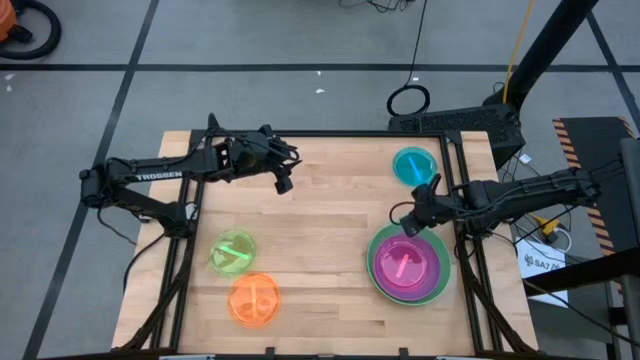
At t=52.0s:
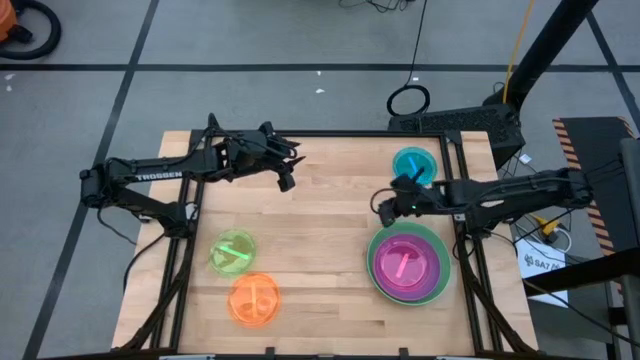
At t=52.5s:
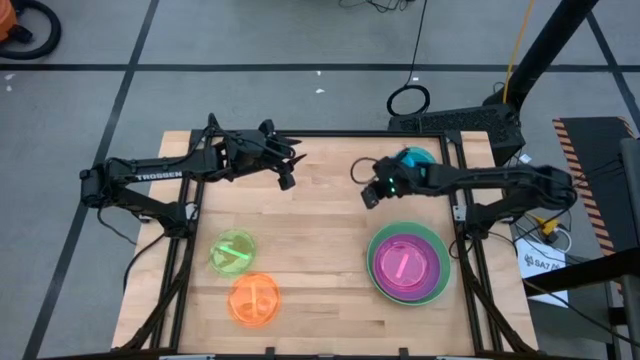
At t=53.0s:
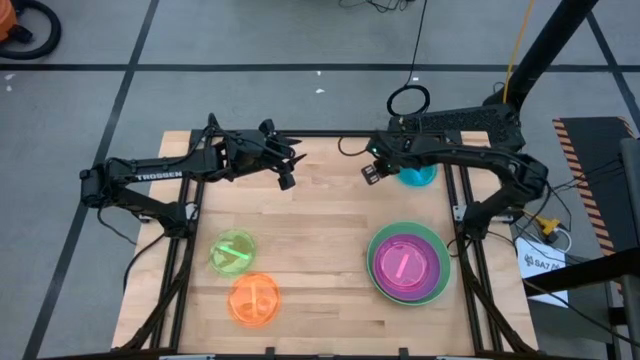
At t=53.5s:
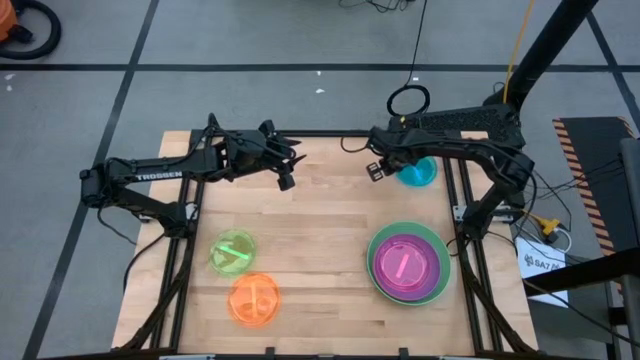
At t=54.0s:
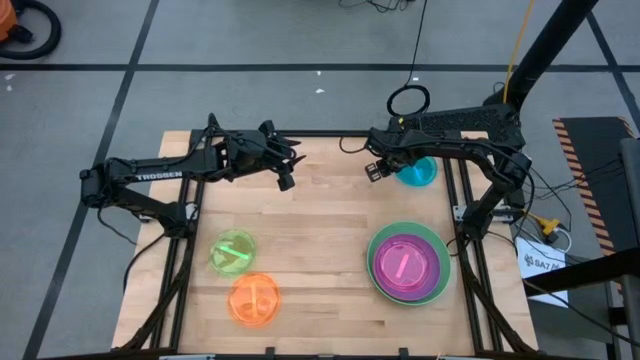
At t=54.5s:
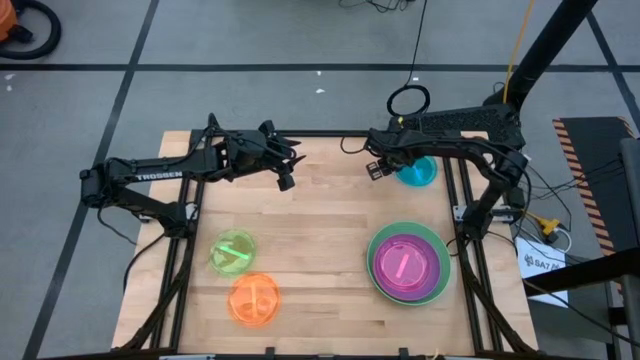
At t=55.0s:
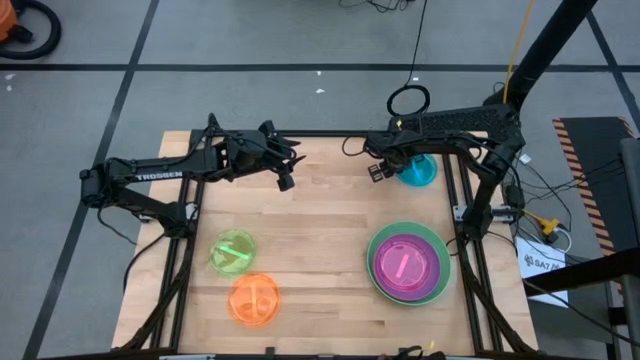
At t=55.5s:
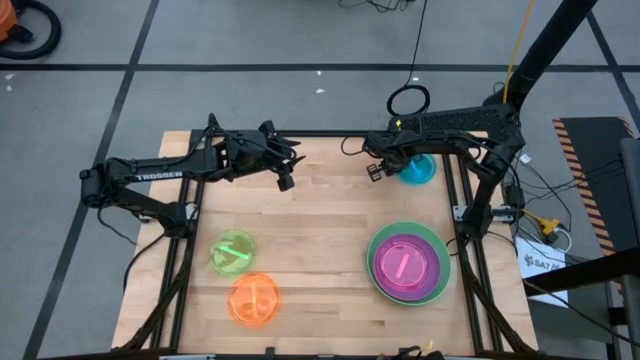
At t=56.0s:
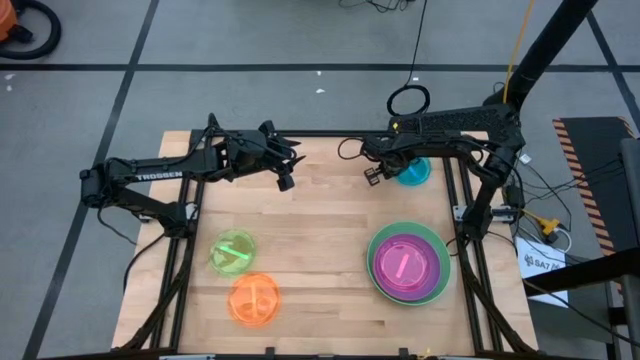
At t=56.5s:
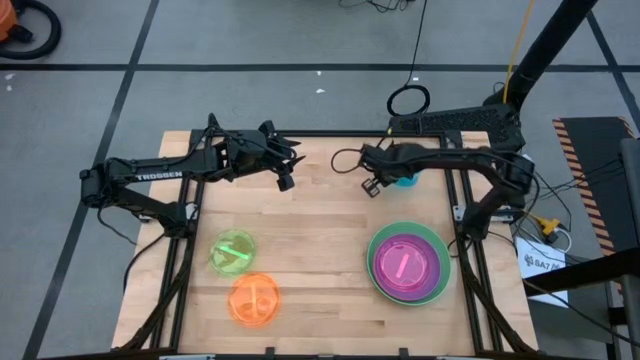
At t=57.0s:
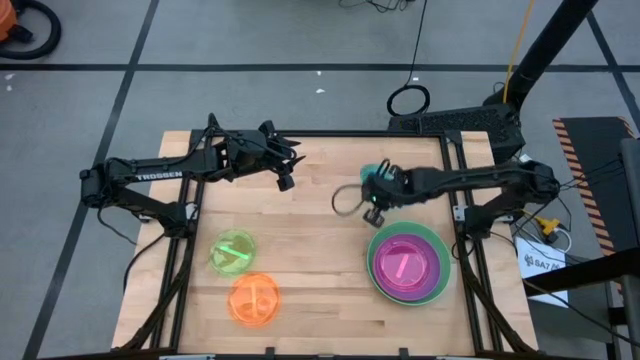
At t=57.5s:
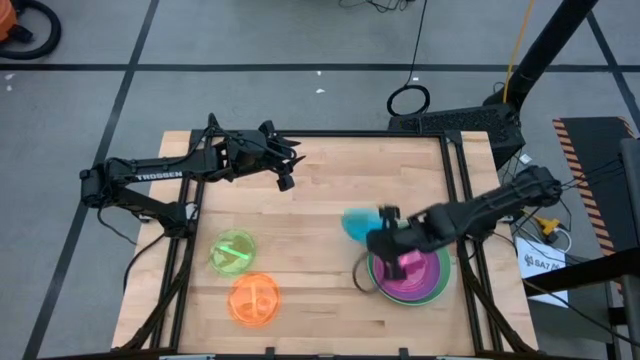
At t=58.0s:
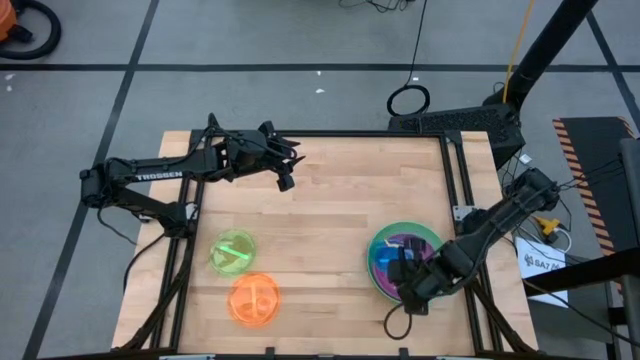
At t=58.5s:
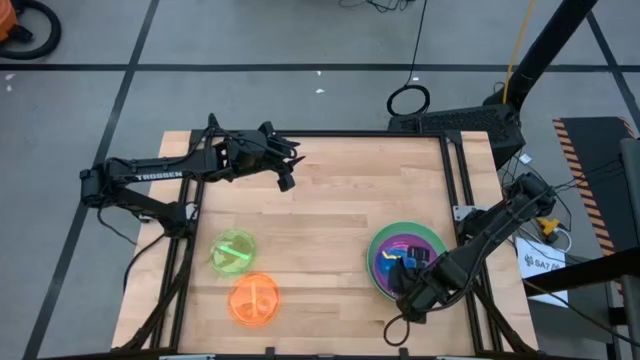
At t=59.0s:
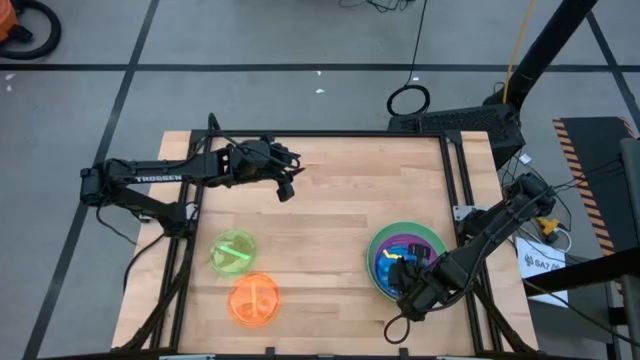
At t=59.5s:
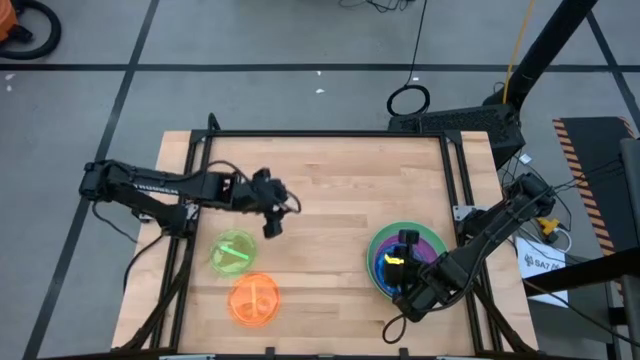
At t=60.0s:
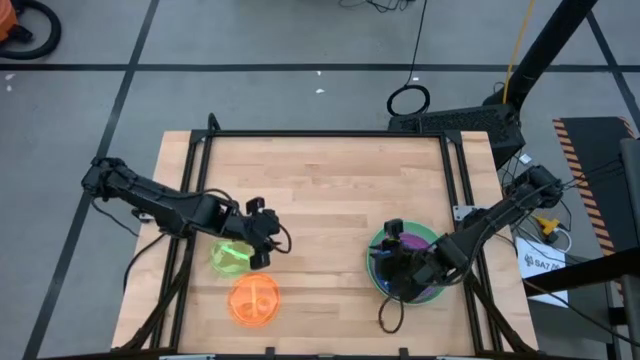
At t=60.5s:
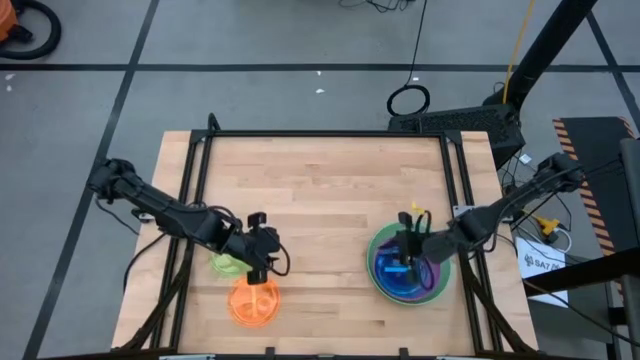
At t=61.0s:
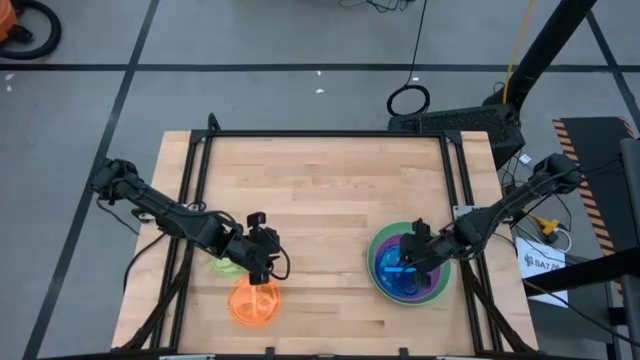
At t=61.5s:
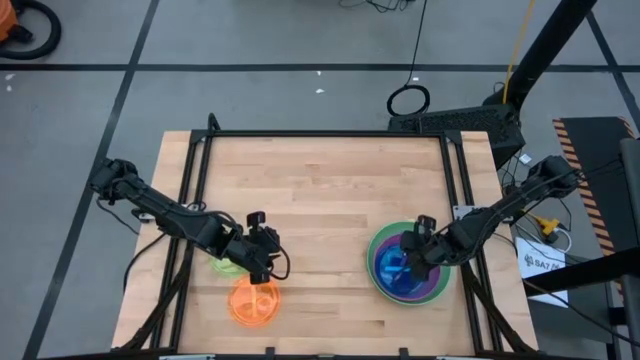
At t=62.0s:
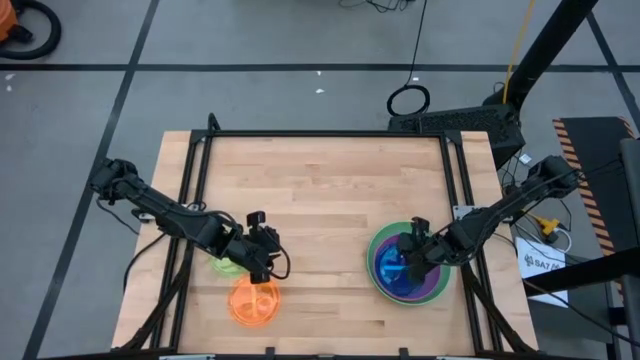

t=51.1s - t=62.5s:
Task: Stack plastic plates
Stack the small blue plate on top of the small pink plate

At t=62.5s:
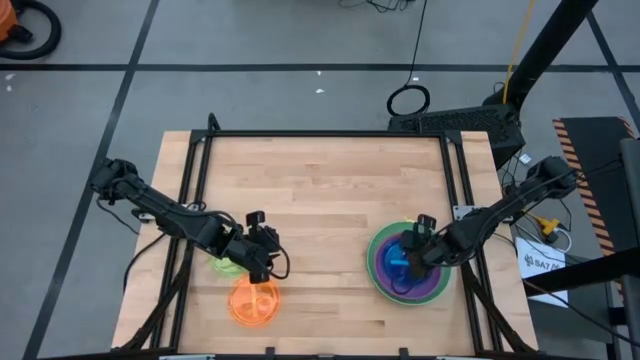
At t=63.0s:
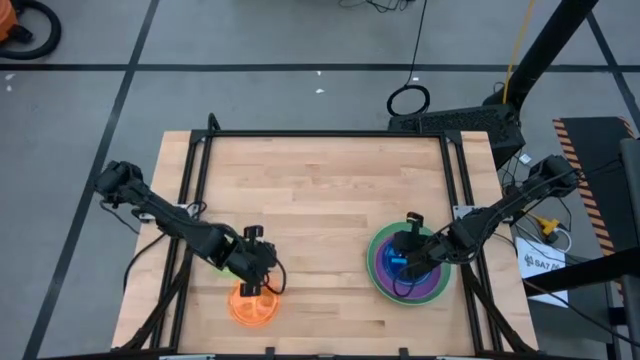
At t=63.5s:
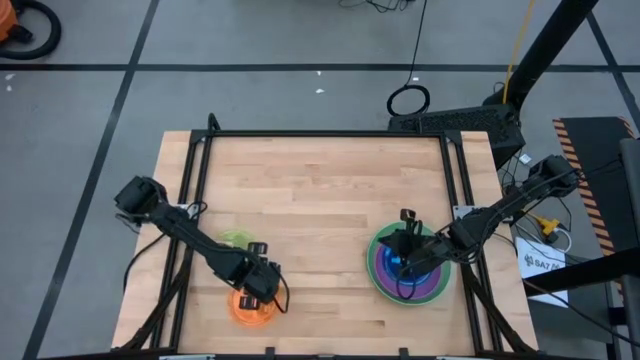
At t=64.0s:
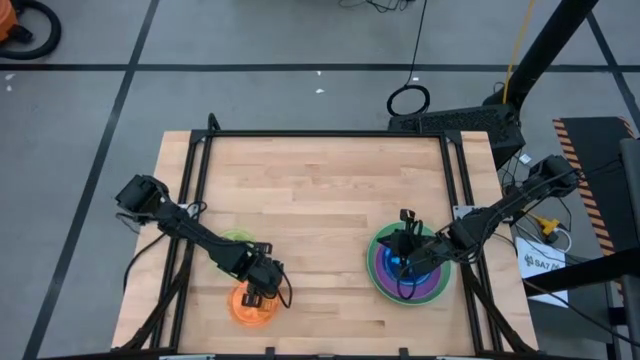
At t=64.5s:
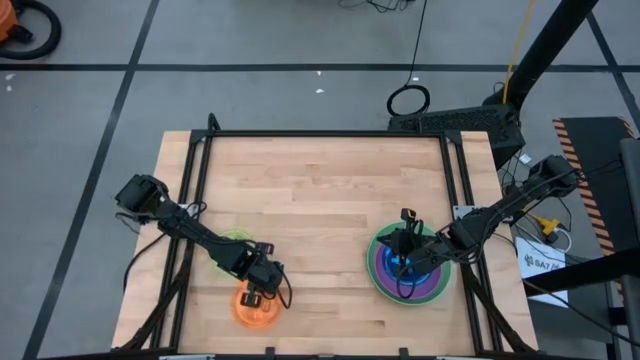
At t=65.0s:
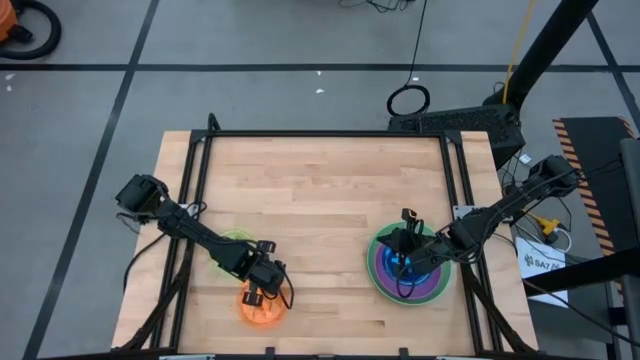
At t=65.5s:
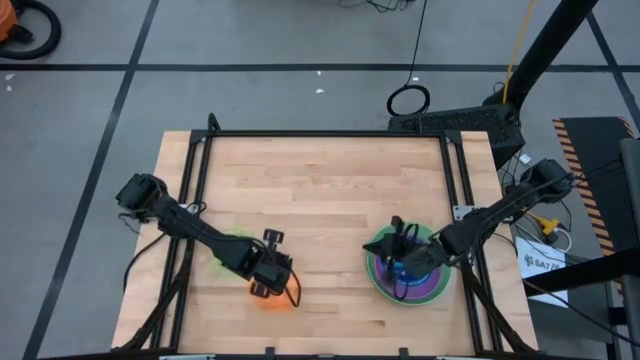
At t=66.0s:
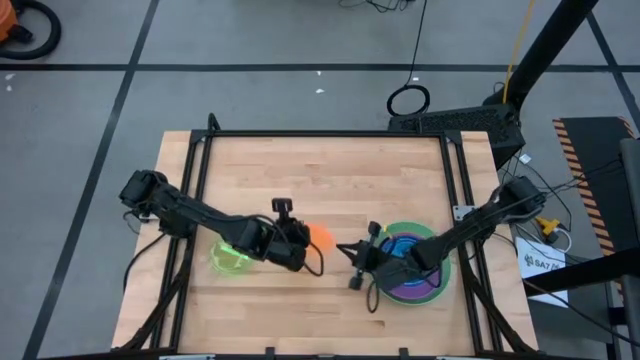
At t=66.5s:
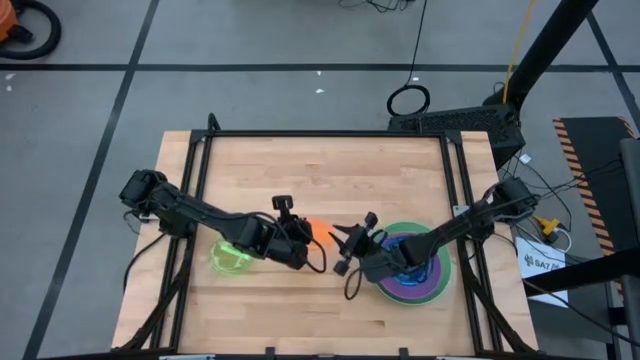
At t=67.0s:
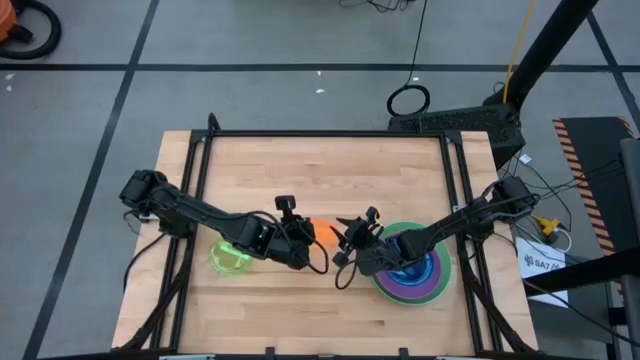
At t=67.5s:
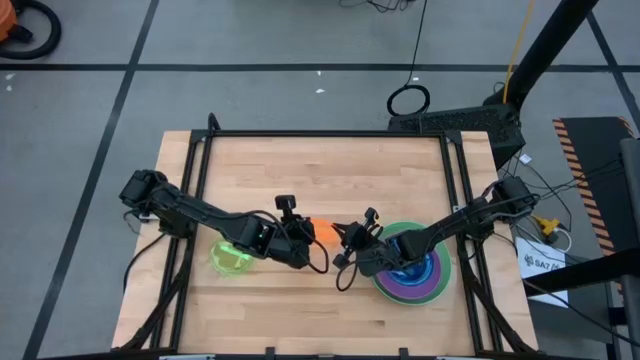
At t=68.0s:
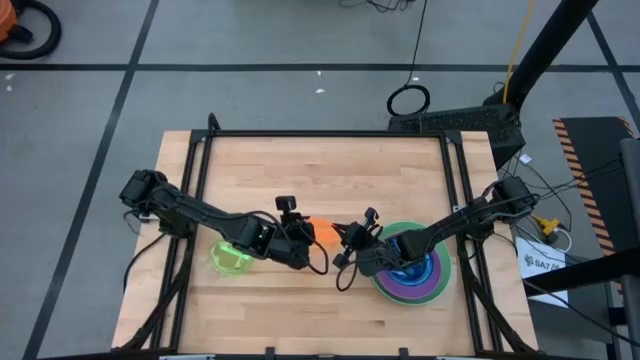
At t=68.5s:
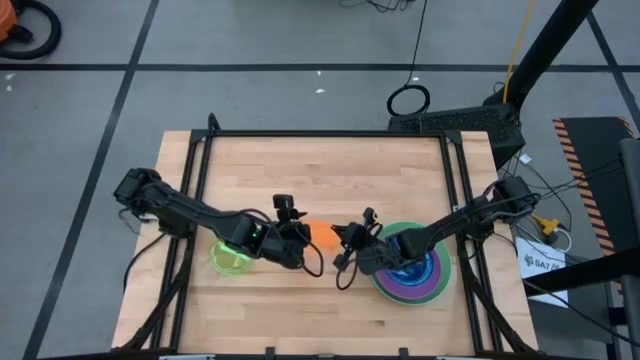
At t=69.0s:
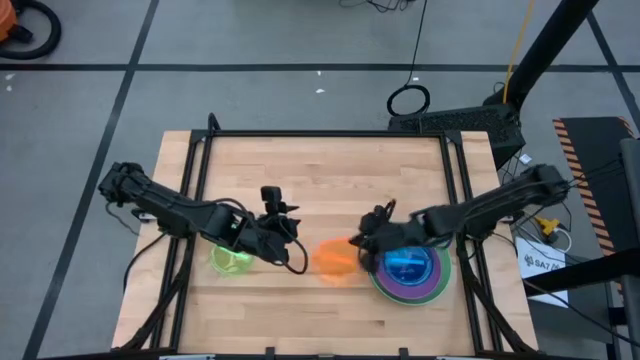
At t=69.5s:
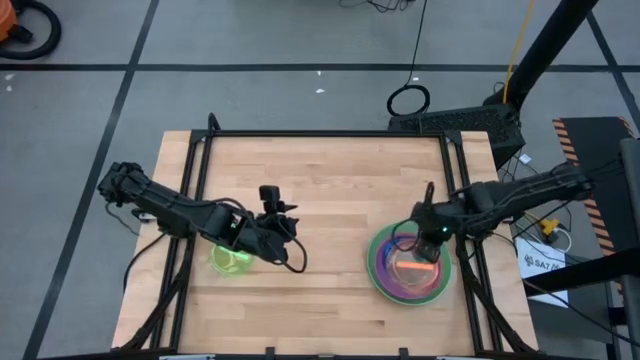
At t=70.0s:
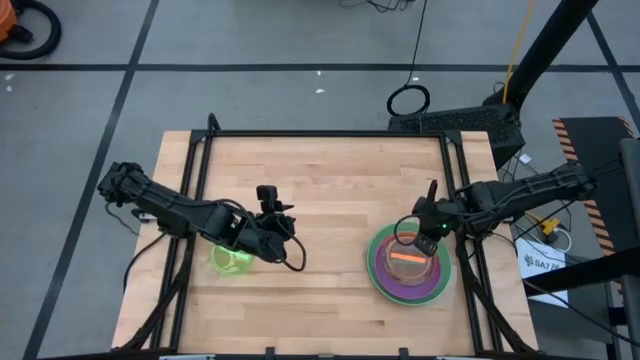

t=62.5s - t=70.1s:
Stack the small orange plate on top of the small blue plate

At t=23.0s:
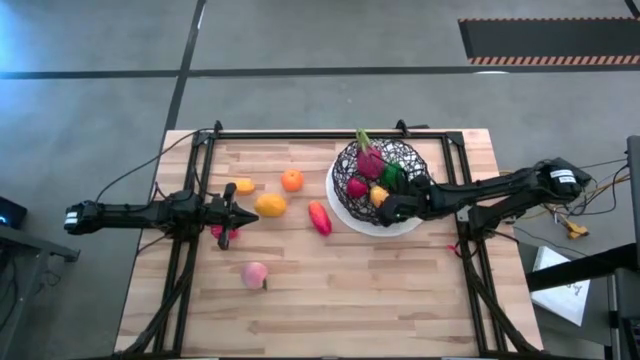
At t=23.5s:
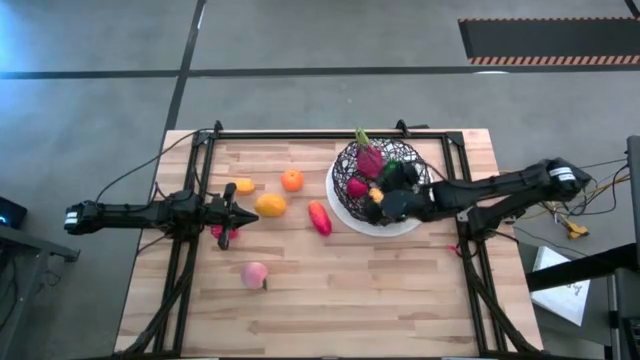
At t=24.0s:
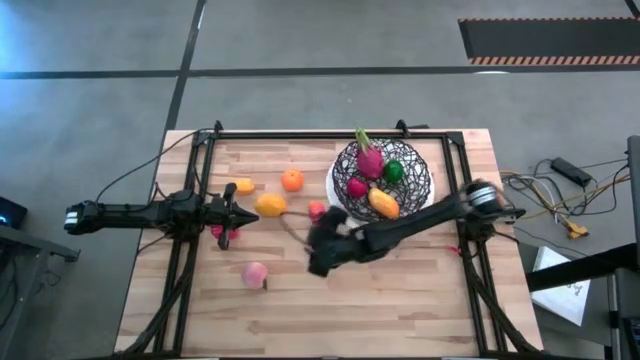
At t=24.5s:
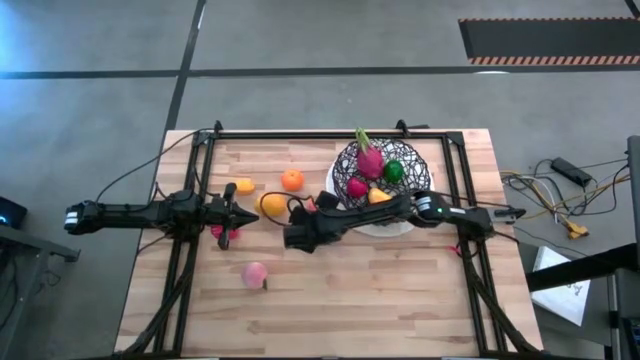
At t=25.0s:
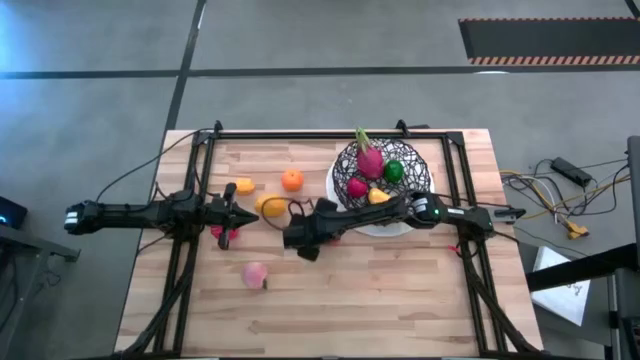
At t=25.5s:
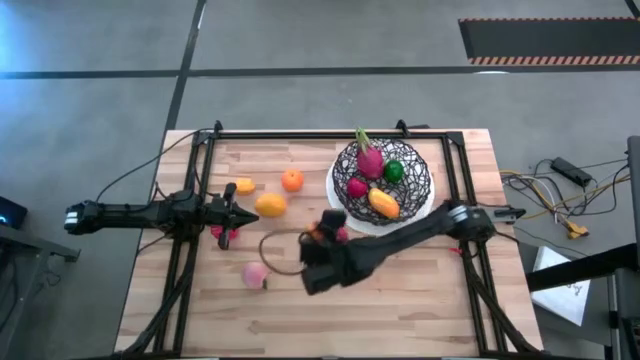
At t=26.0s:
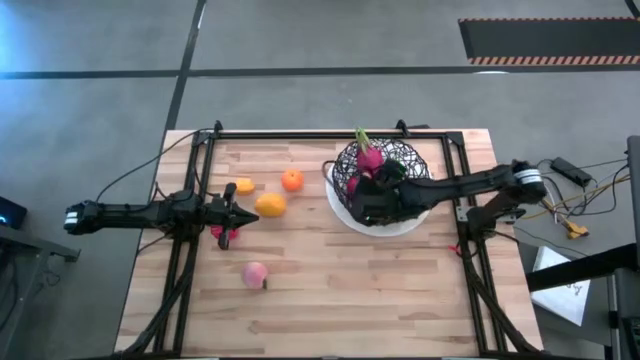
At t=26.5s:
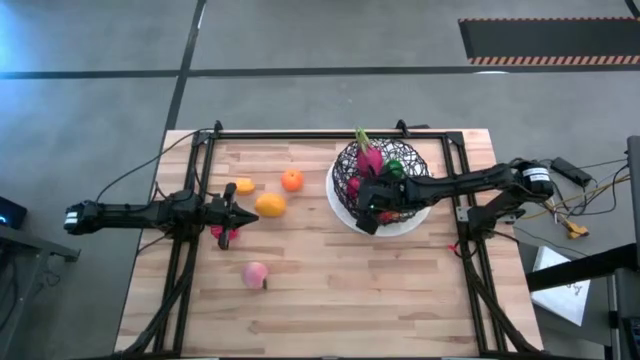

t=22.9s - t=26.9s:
Task: Build produce basket
Put the mango into the black basket
